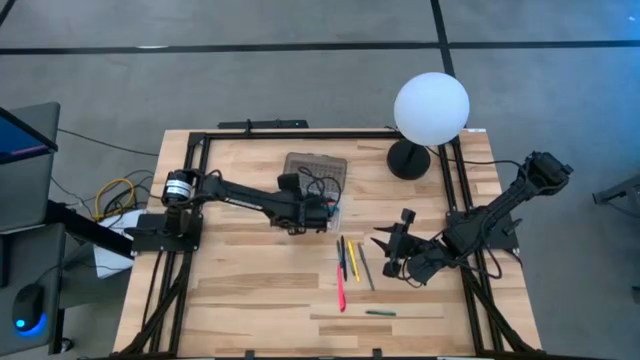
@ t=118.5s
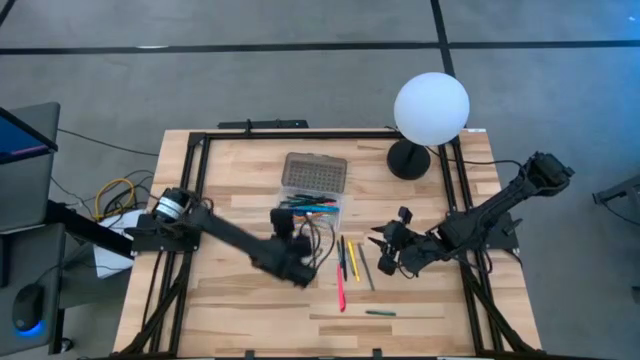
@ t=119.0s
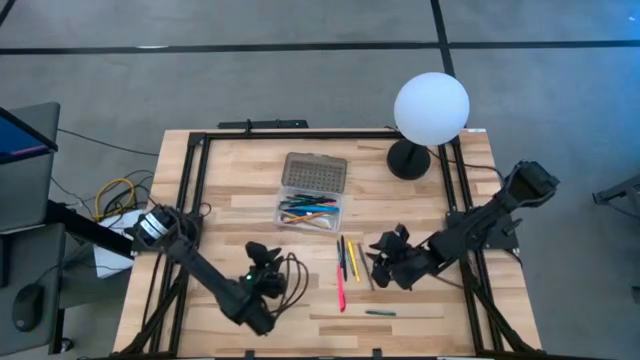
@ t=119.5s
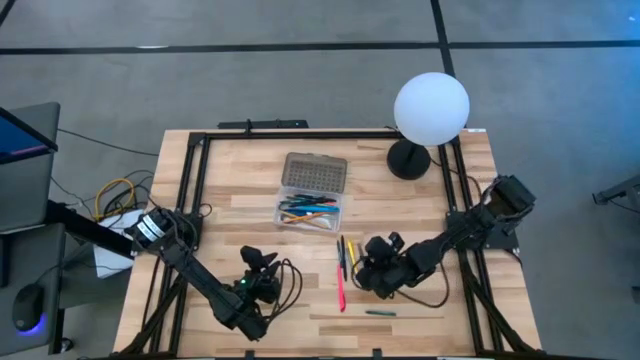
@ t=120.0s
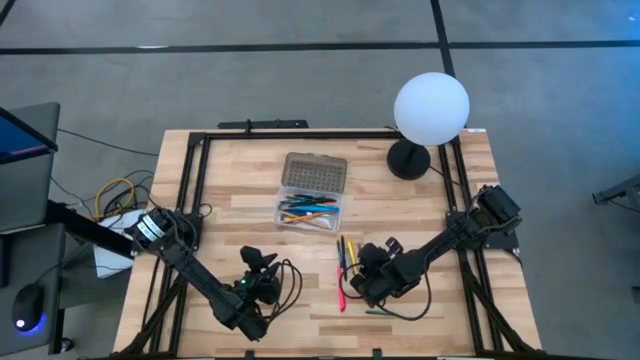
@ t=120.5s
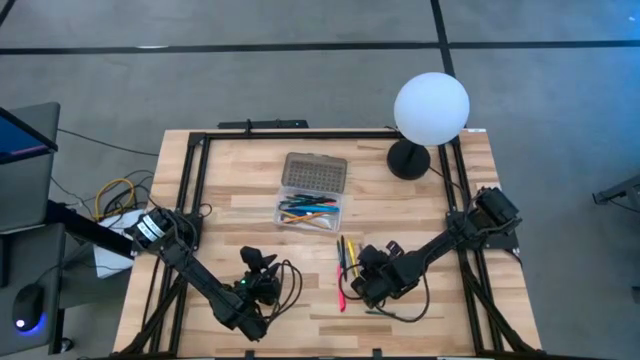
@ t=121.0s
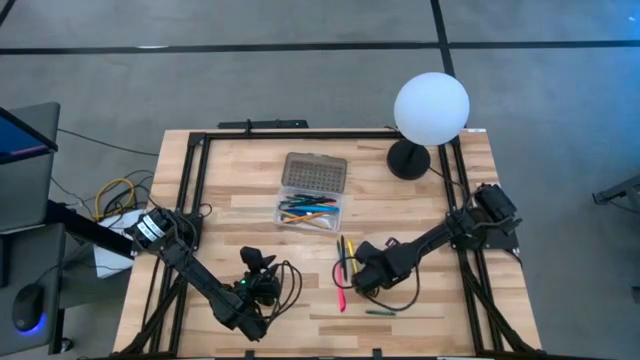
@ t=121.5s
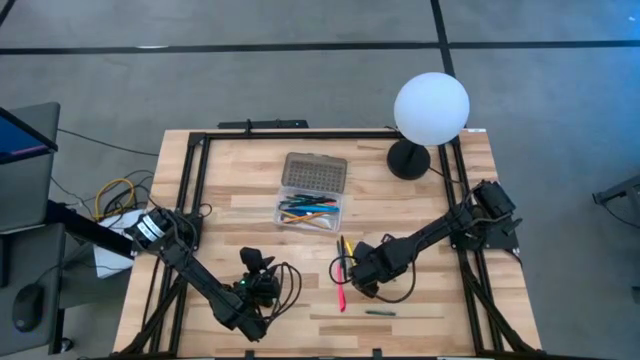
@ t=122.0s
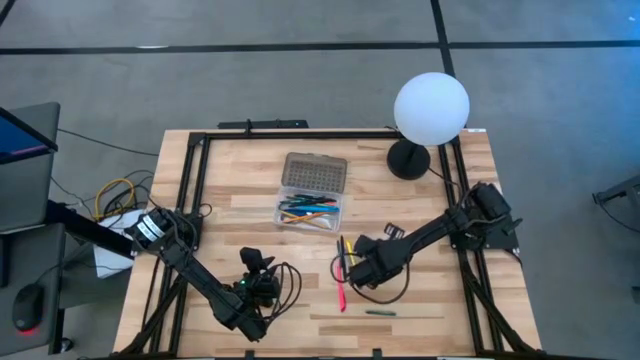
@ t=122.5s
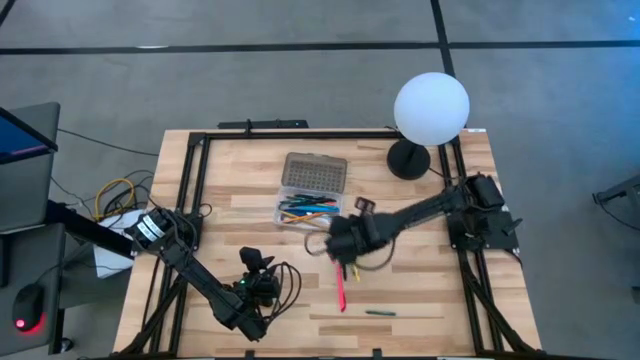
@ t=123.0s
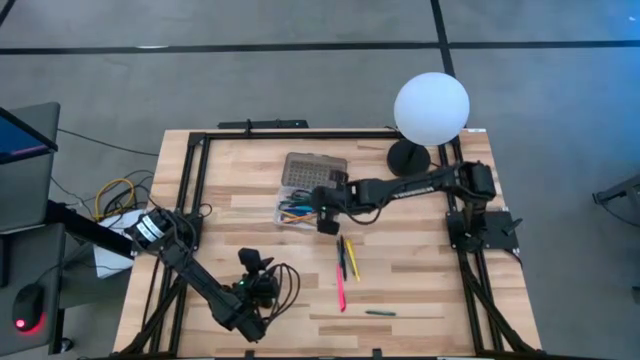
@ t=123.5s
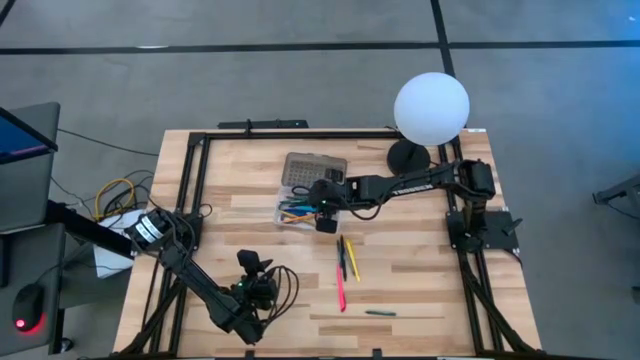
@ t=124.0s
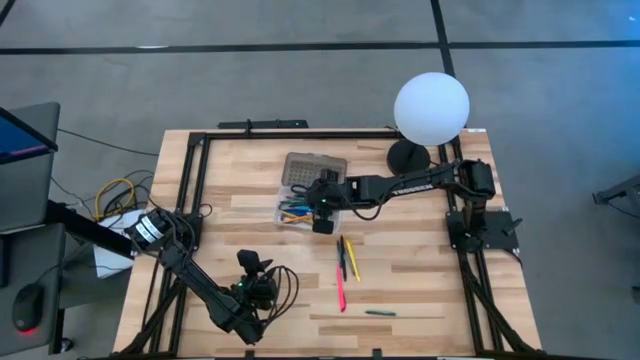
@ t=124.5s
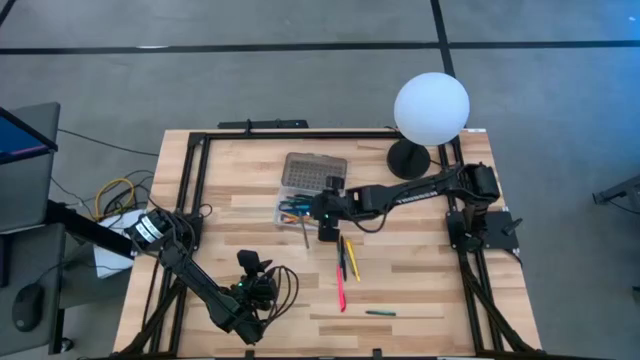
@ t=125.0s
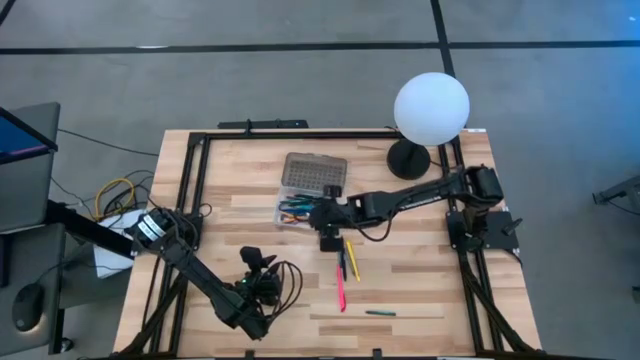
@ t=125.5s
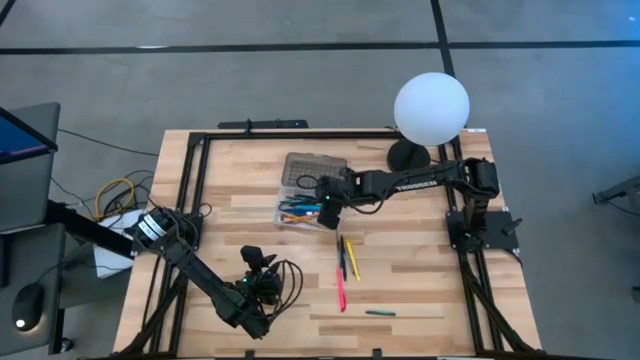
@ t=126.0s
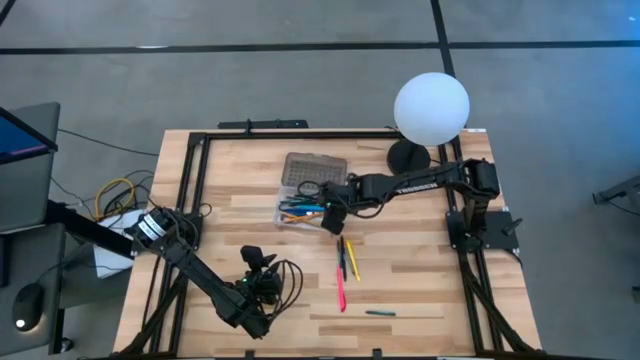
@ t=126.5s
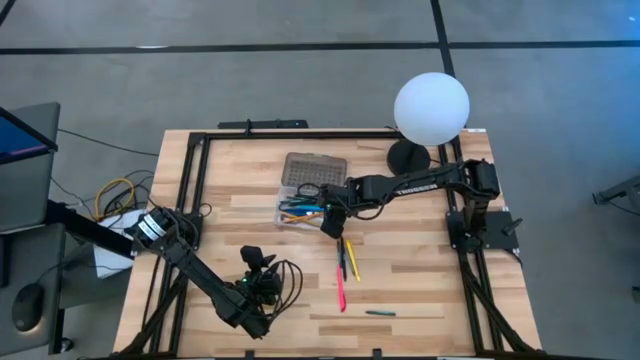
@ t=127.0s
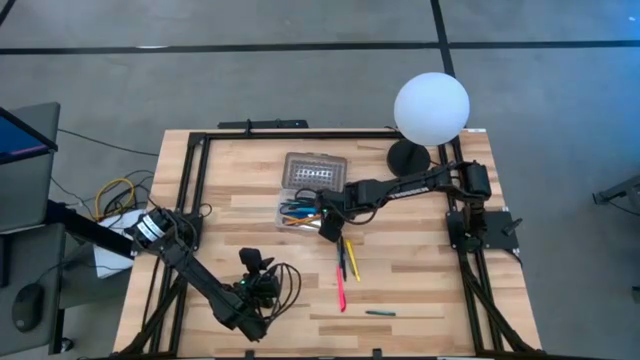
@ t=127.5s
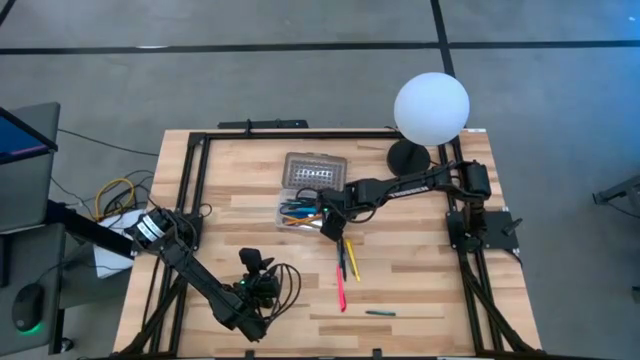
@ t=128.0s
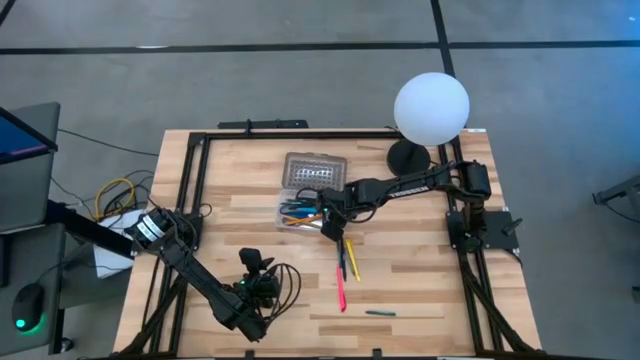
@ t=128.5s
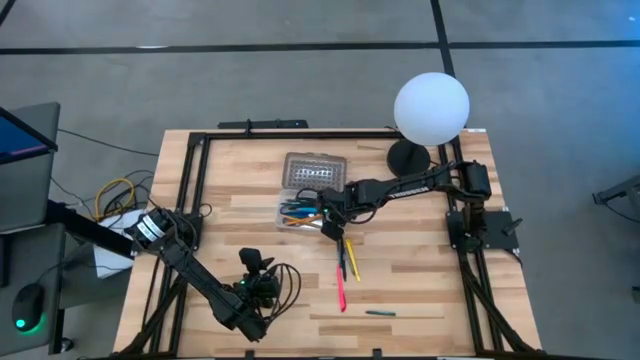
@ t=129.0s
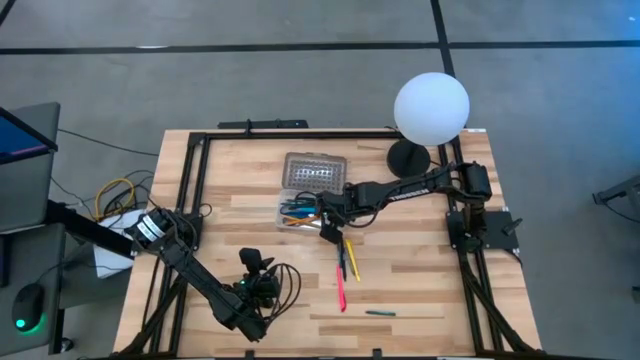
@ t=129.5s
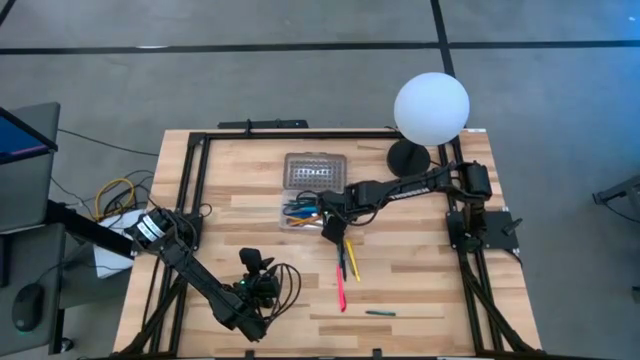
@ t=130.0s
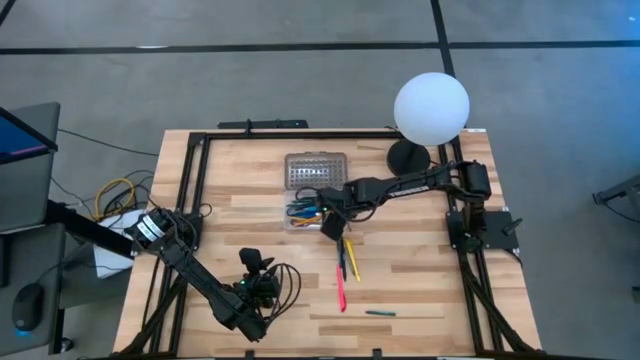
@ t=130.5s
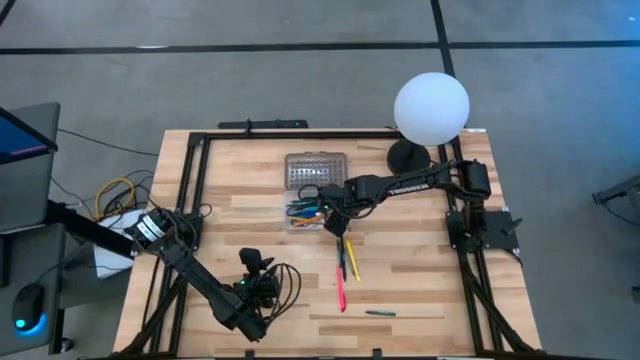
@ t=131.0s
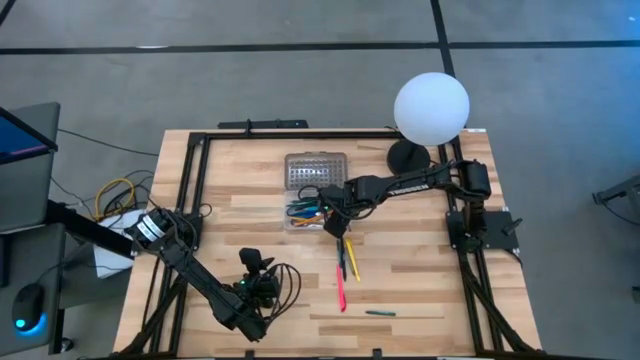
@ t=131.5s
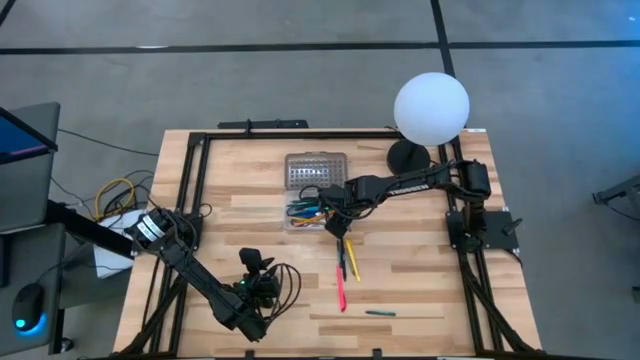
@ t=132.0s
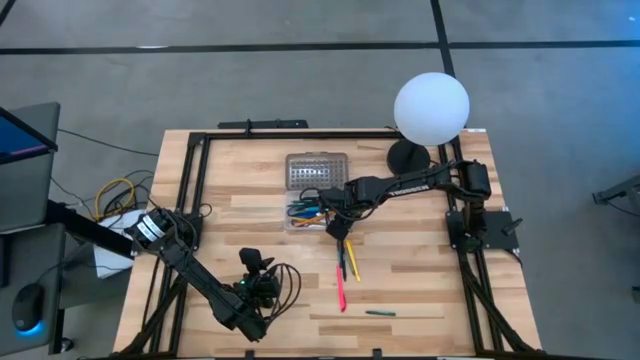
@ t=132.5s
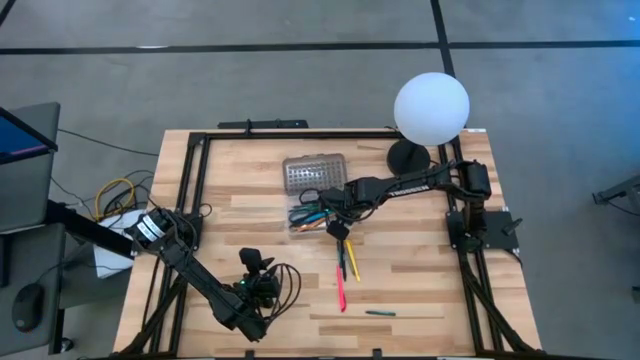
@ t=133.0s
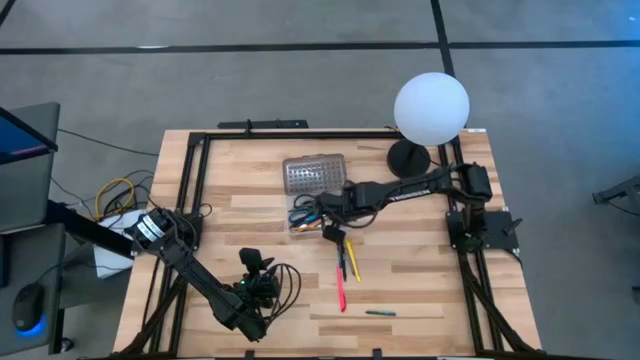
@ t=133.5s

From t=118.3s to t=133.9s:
Task: Pick & place school supplies into a supply box
Put the gray pen into the gray supply box

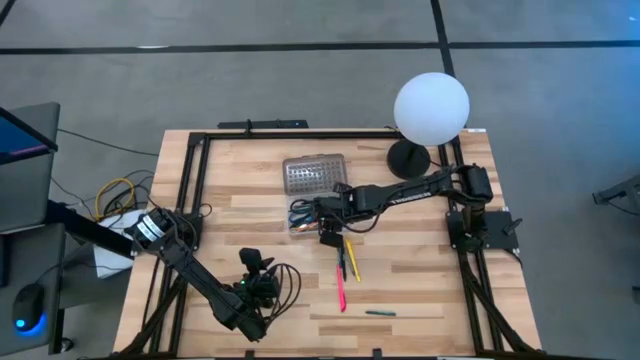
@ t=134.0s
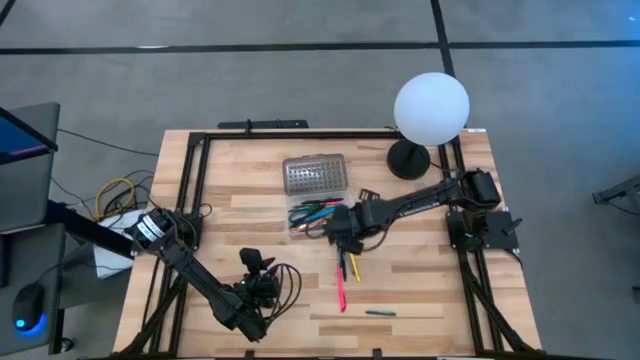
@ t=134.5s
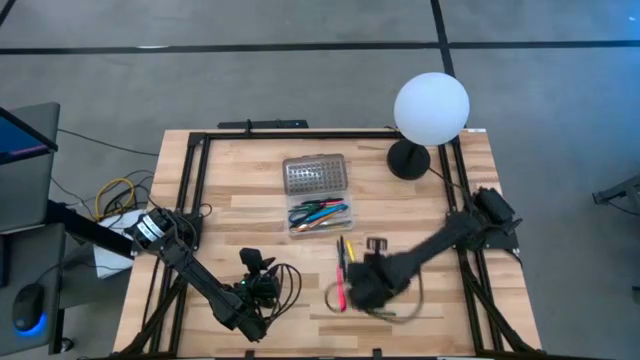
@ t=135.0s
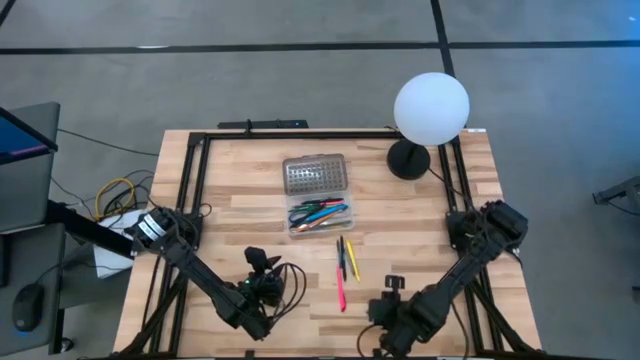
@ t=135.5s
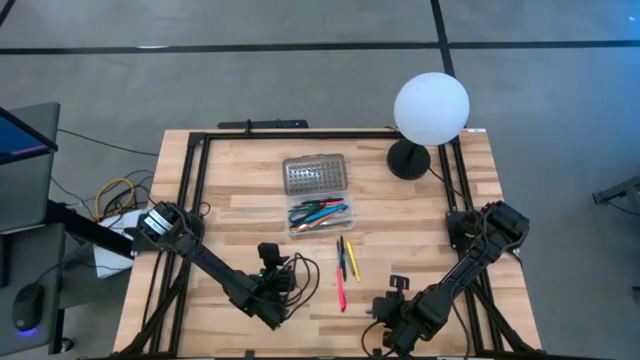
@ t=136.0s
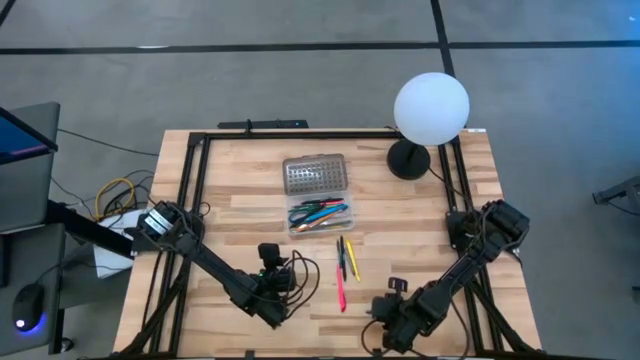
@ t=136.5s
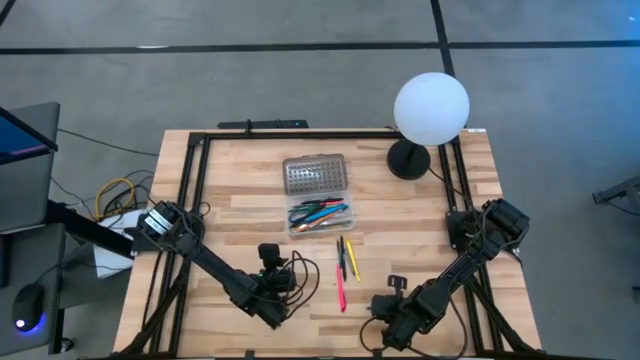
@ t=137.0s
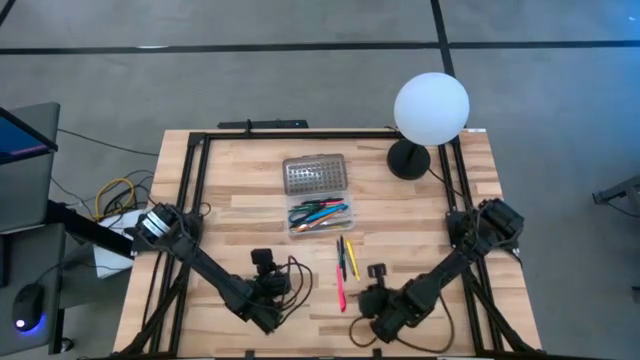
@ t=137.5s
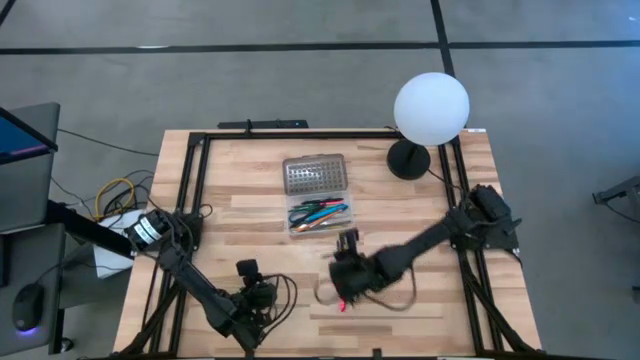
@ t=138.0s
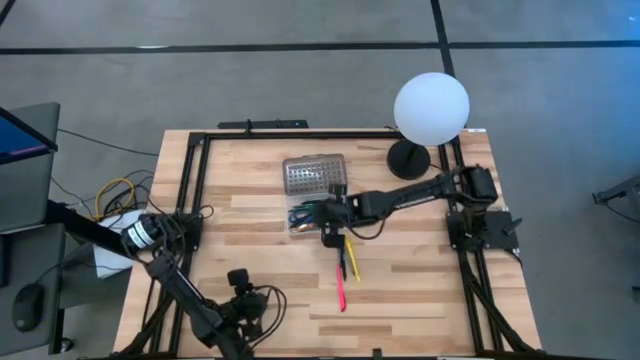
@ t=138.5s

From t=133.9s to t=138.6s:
Put the green crayon into the gray supply box
